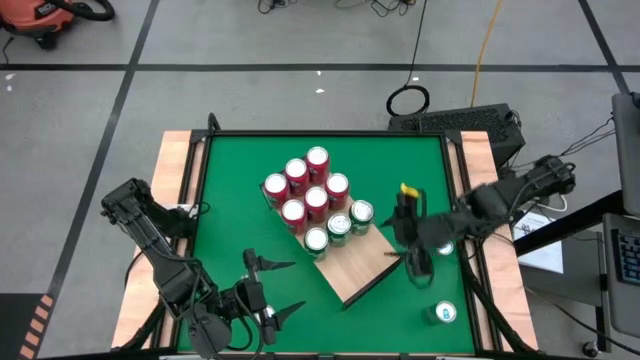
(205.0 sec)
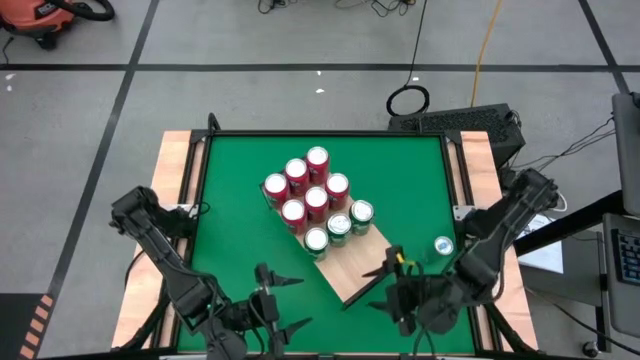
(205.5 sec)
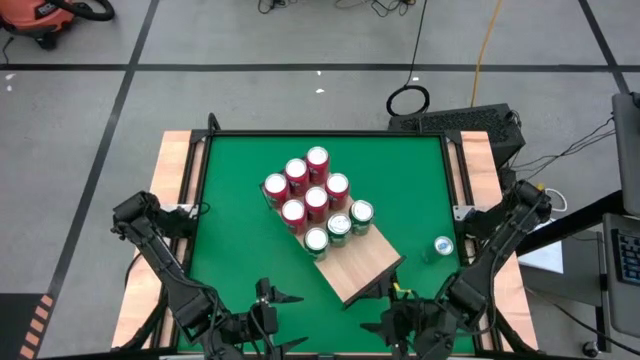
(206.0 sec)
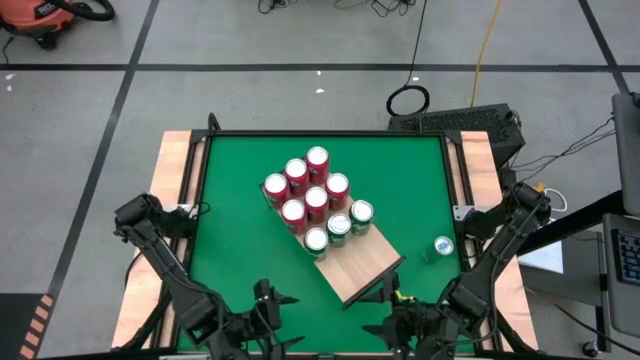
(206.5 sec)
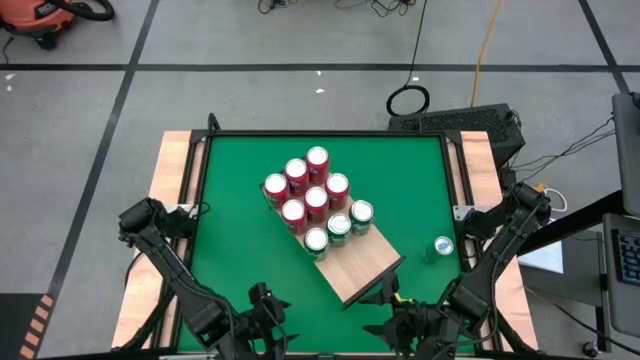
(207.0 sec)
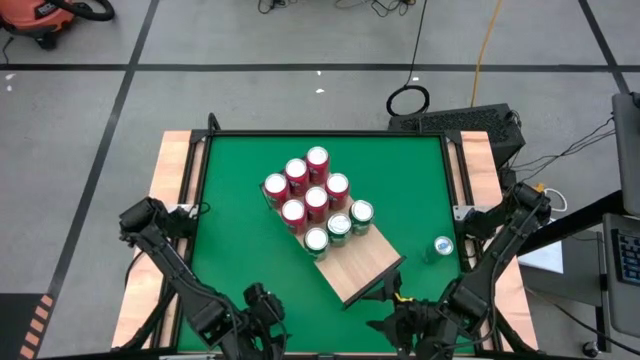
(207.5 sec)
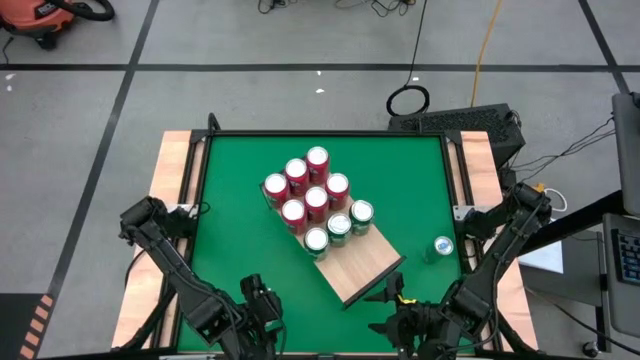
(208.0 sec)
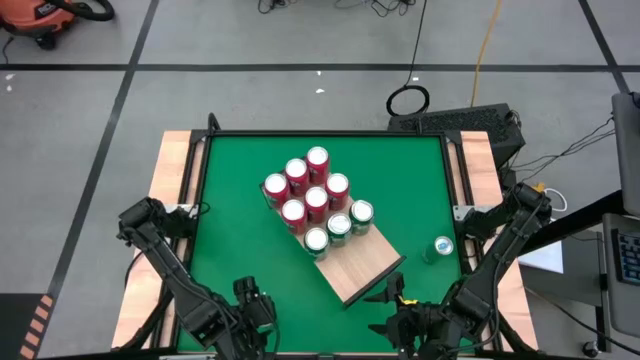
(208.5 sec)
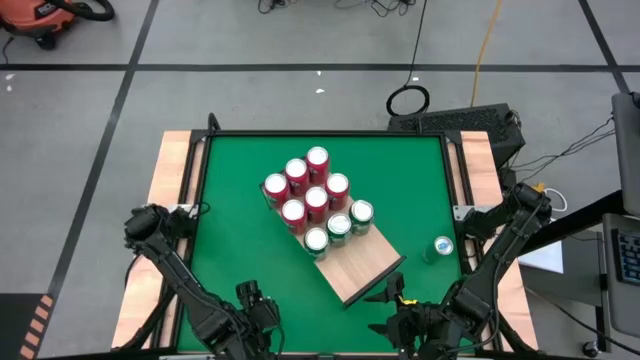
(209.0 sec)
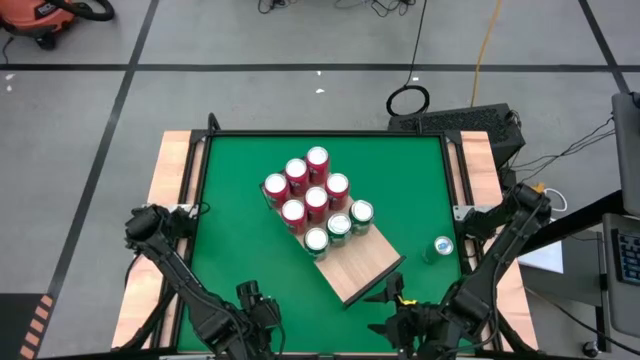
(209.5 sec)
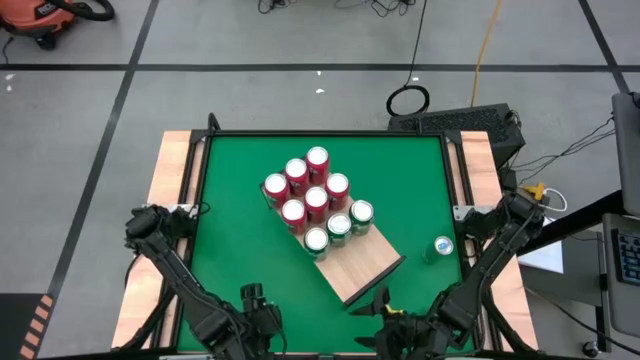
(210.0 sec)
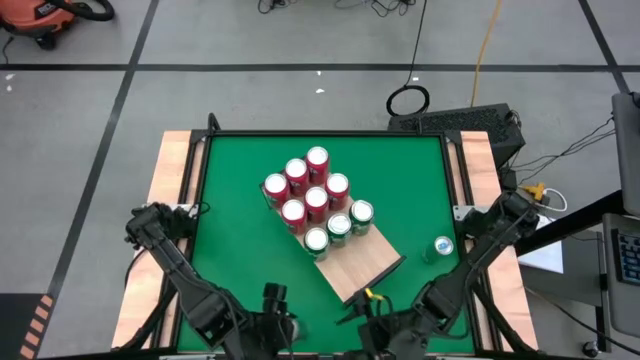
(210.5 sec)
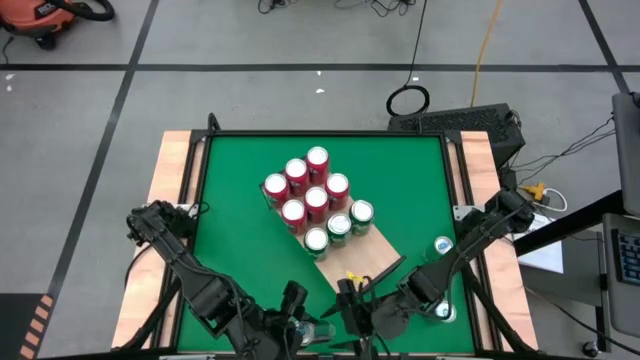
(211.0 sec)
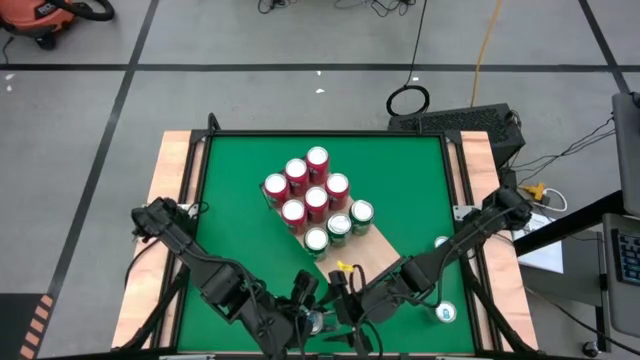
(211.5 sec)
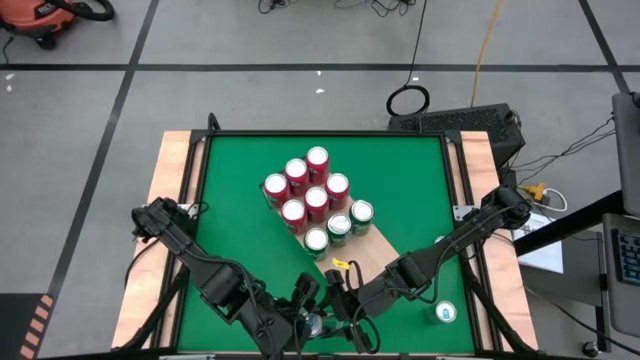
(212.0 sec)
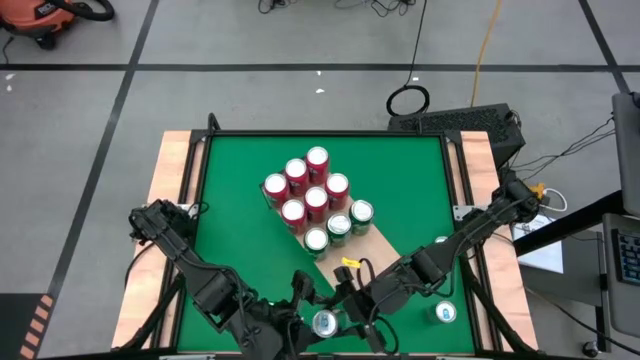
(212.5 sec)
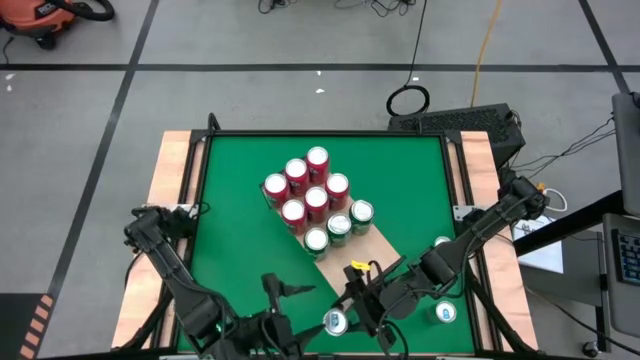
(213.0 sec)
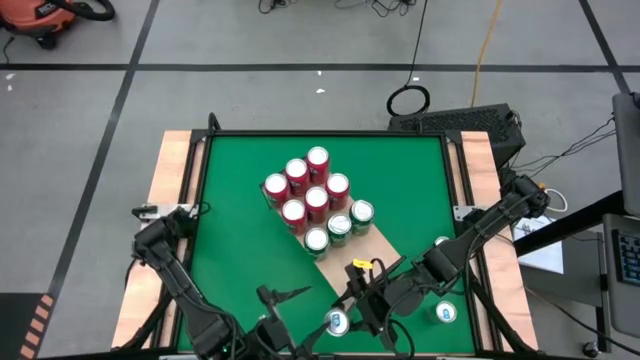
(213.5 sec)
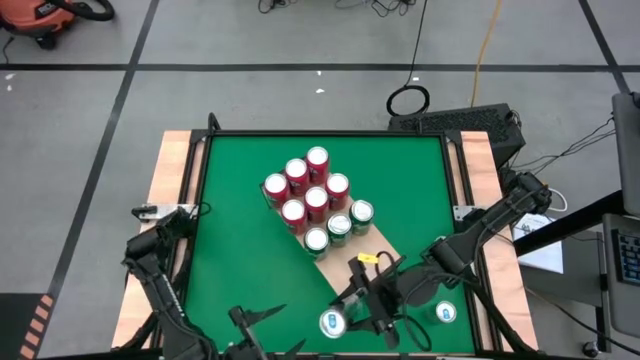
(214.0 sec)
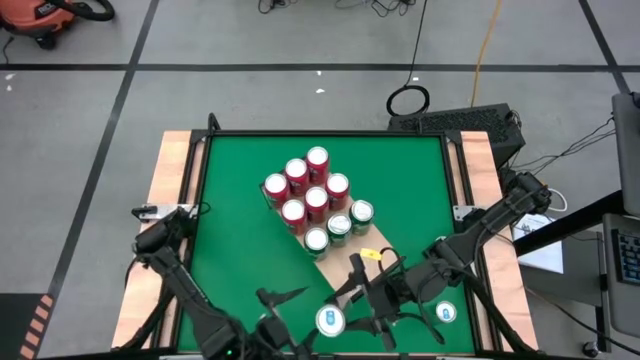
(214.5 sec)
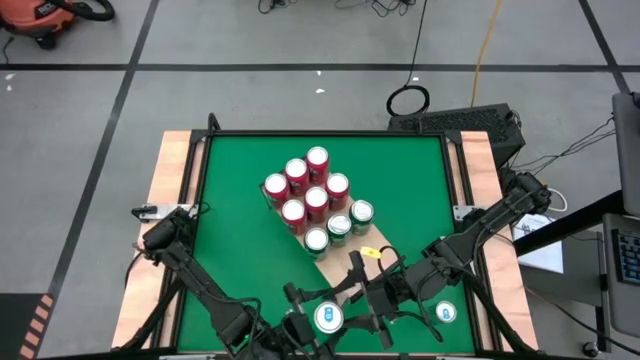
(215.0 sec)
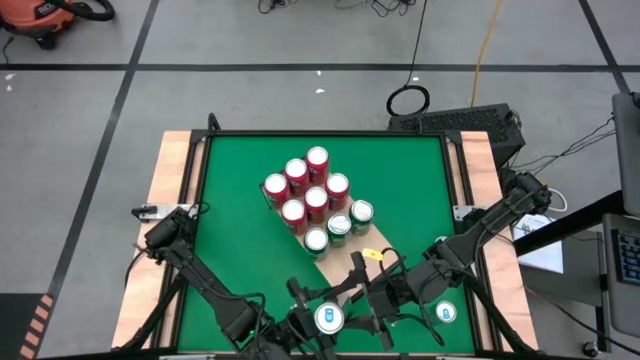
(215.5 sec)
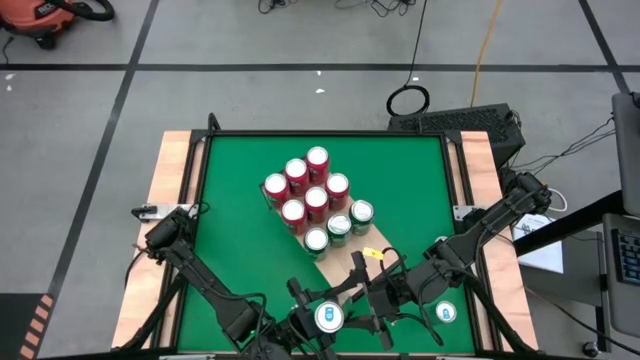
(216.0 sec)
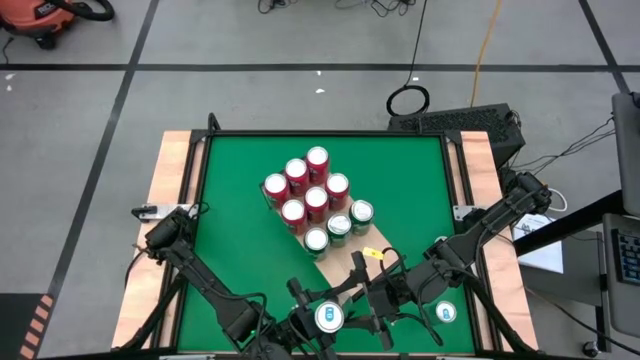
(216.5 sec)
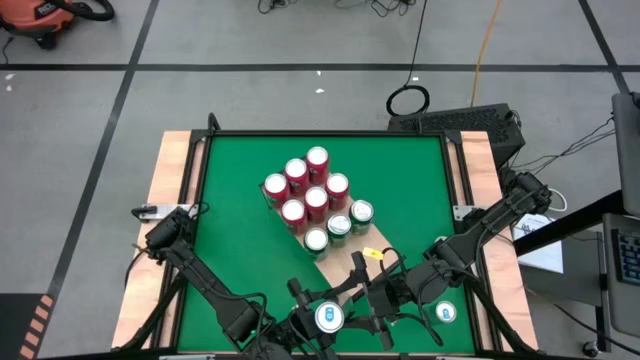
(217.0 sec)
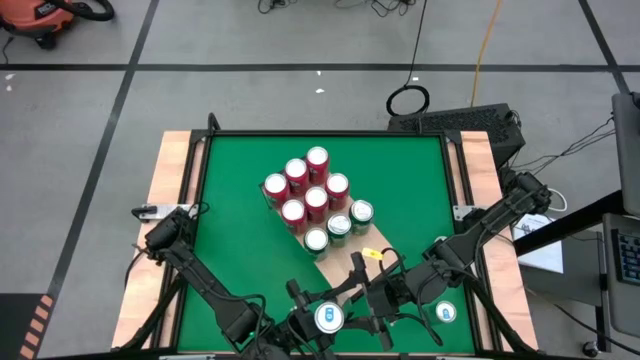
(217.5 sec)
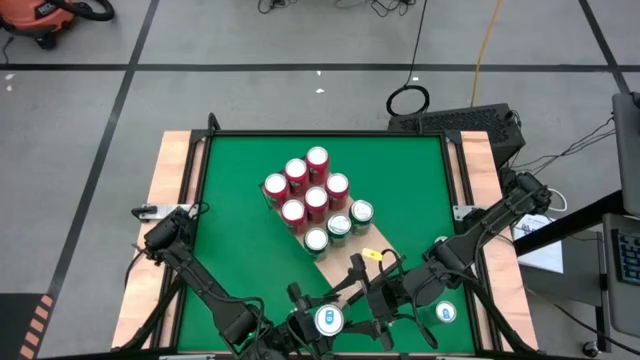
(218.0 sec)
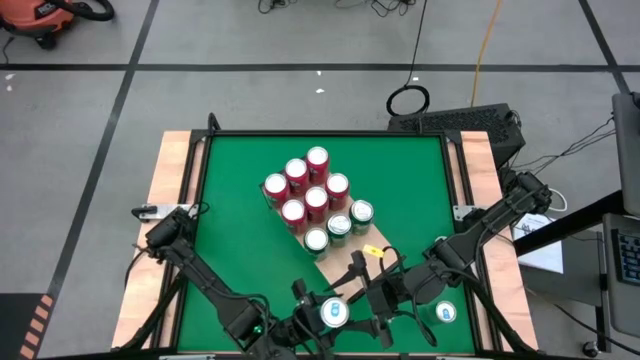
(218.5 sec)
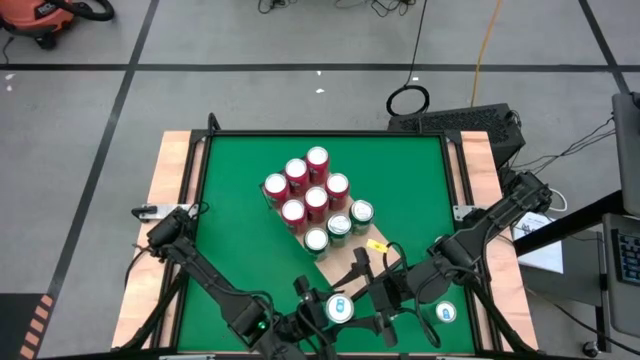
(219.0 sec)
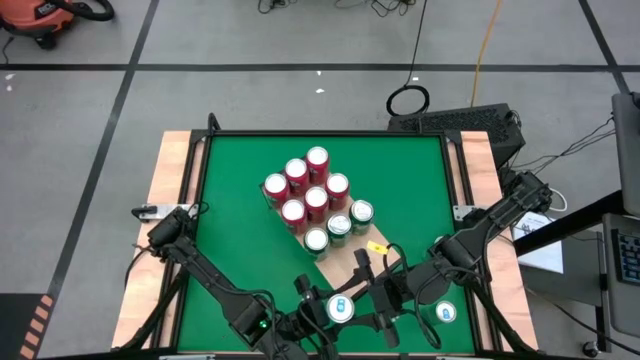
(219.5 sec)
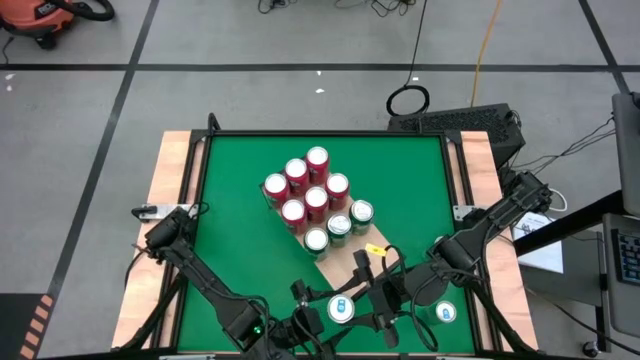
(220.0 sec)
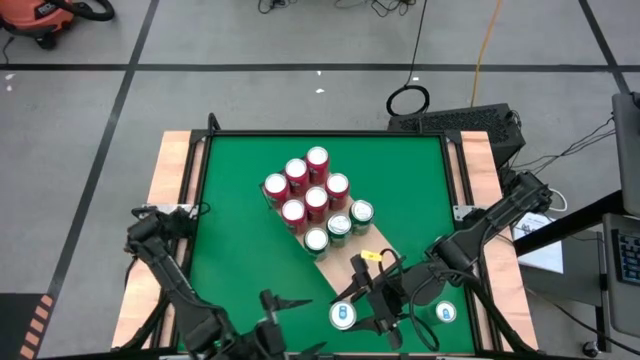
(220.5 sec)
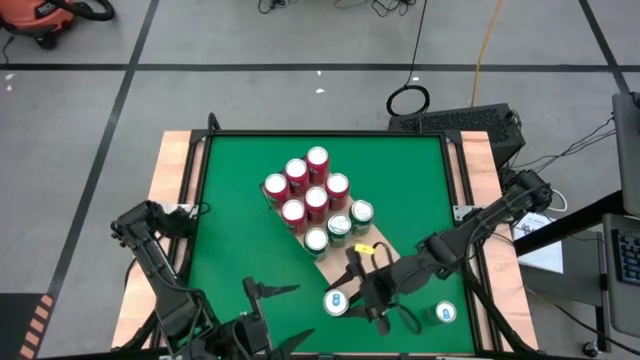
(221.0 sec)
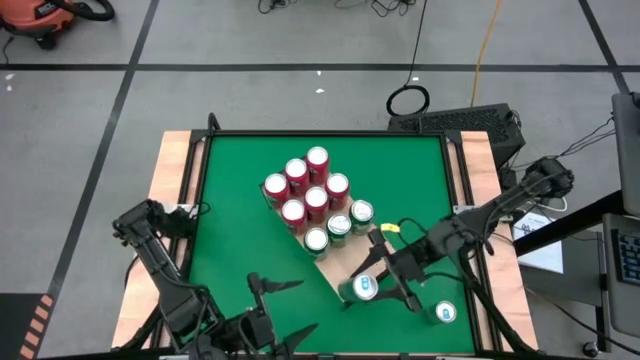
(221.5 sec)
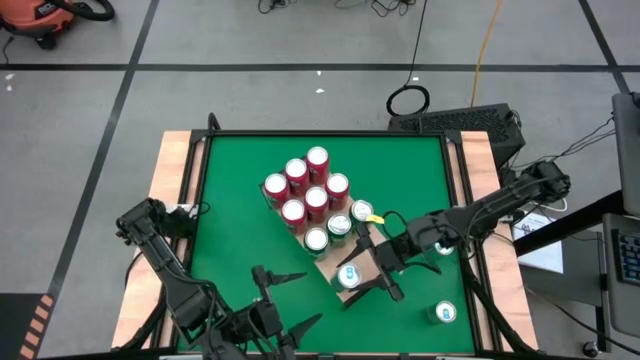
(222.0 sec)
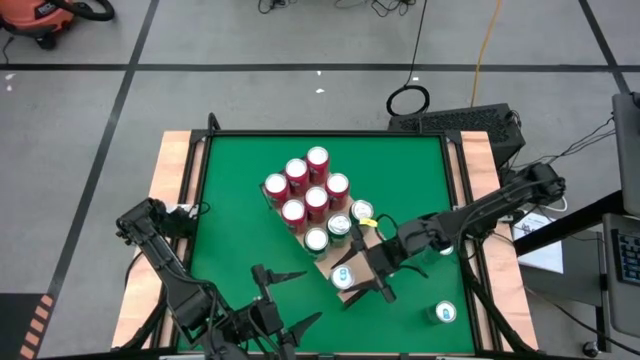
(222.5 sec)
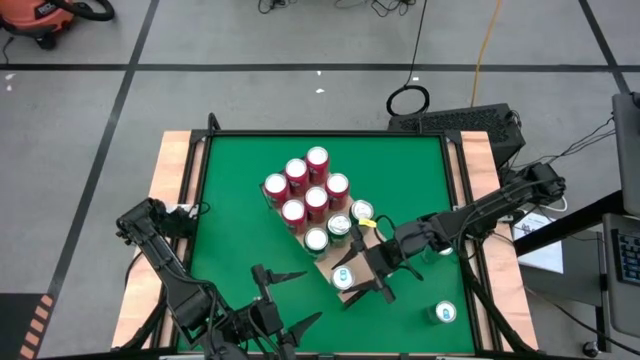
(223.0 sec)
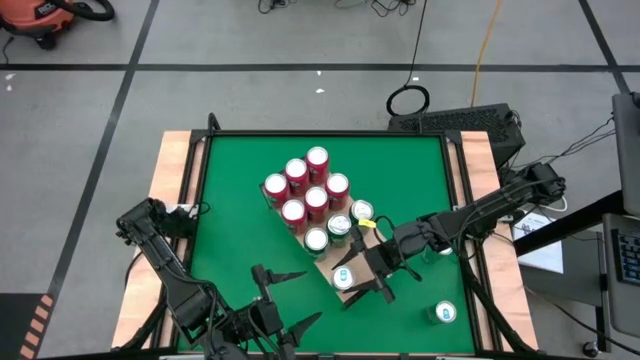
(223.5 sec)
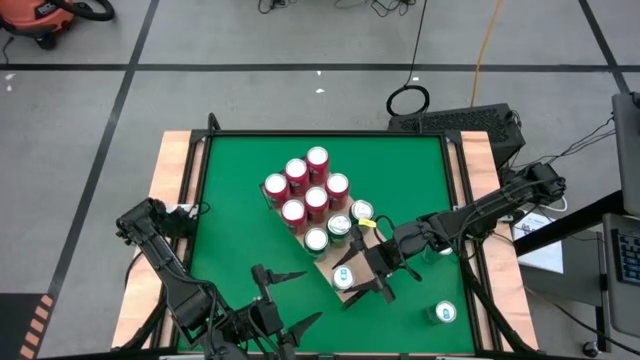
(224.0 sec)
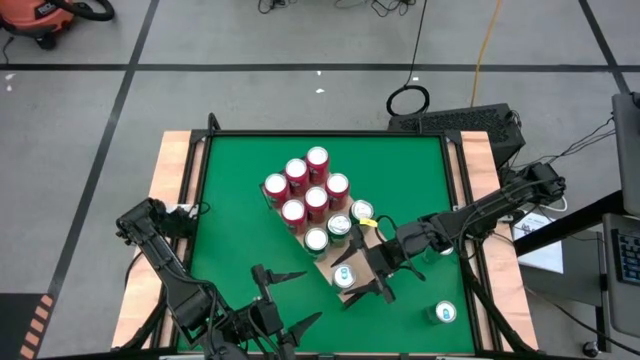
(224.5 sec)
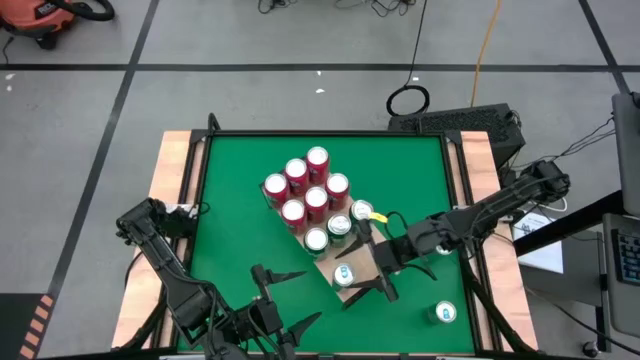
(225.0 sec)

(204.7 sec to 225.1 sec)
Task: Place canned beverage on shelf
Put the blue soda can on the shelf

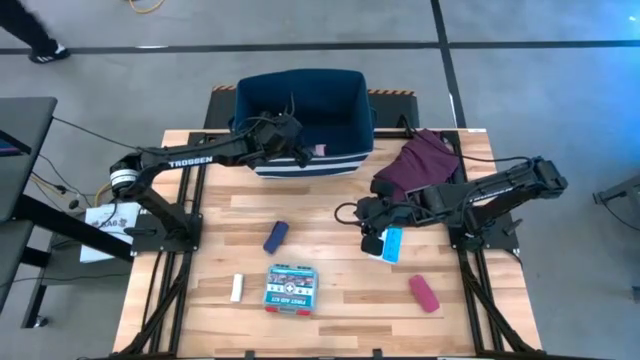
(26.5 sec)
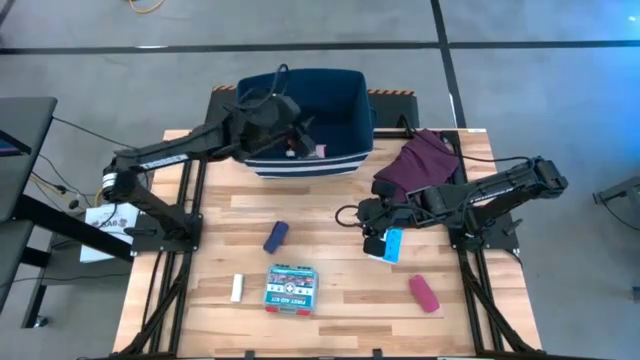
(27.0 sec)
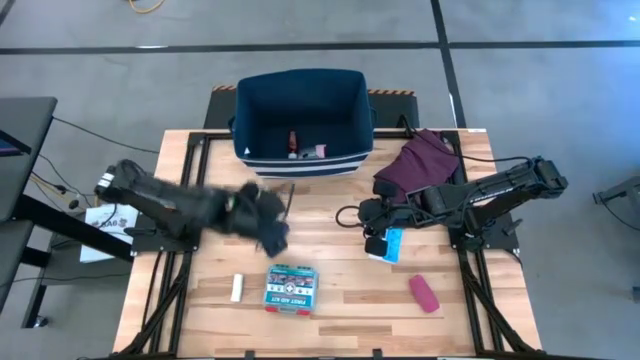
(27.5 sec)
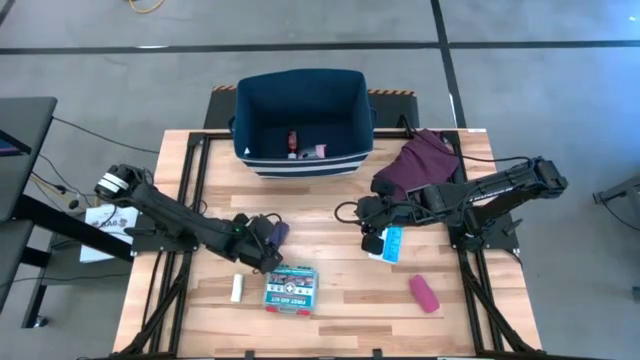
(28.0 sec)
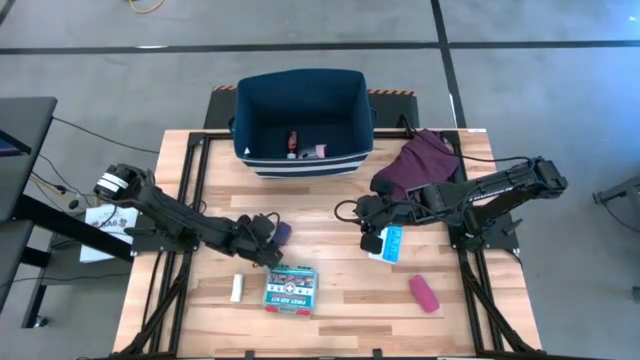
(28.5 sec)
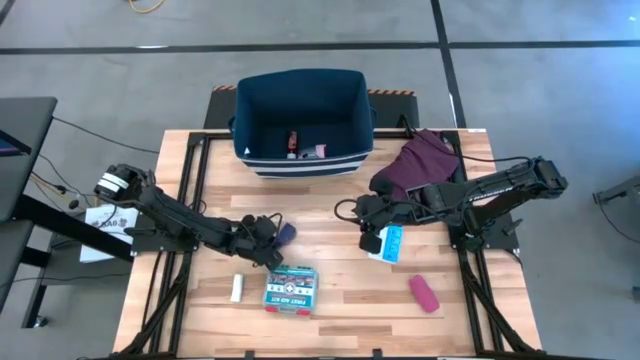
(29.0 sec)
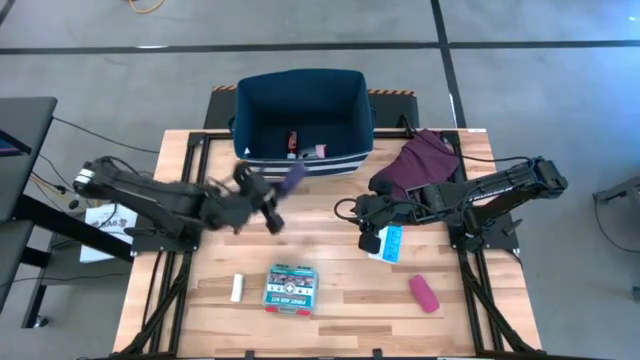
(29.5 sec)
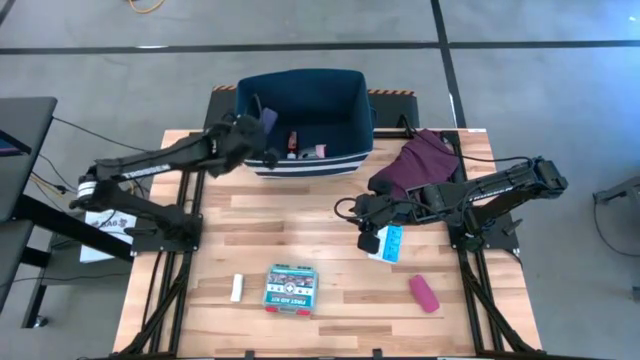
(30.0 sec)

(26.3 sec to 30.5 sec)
Task: Pick & place medical supplies in basket/bin
Put the blue bandage into the blue bin
